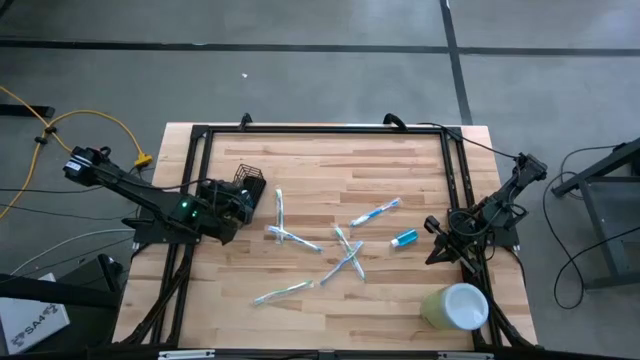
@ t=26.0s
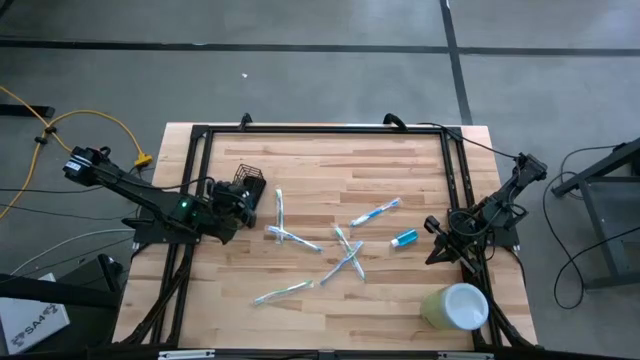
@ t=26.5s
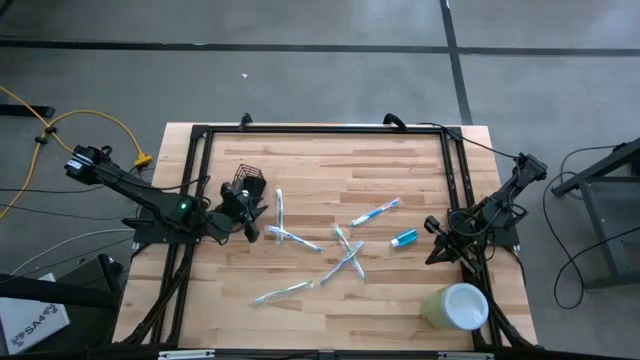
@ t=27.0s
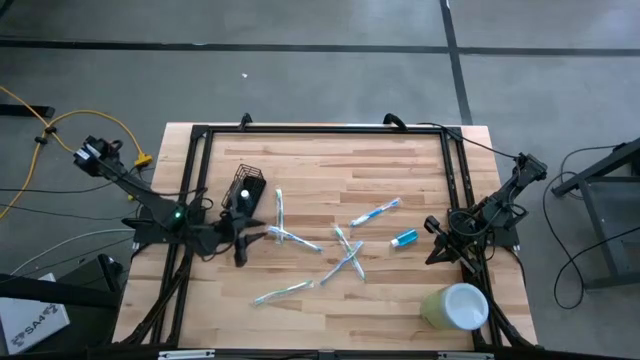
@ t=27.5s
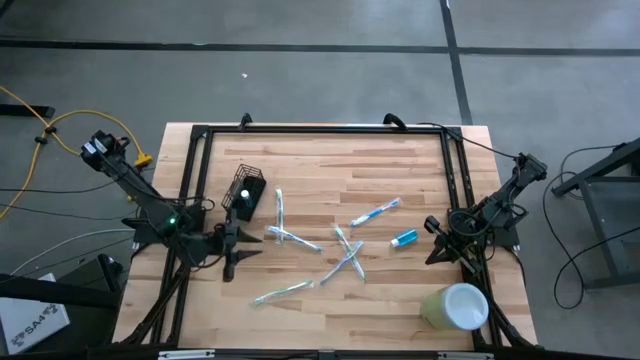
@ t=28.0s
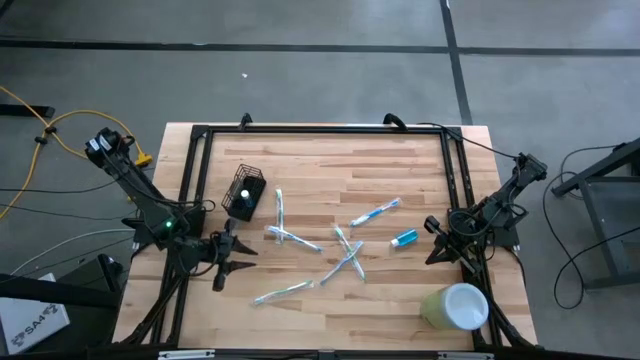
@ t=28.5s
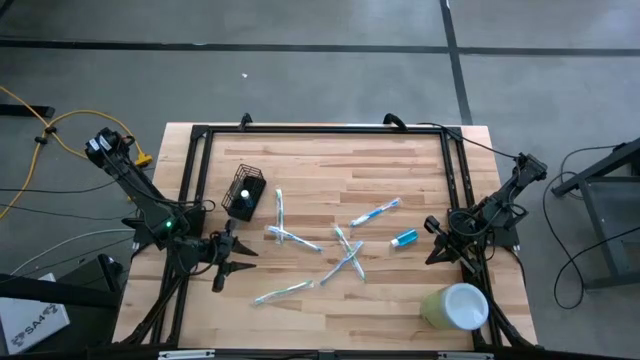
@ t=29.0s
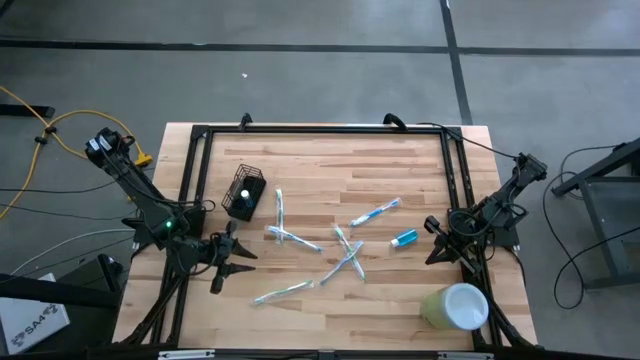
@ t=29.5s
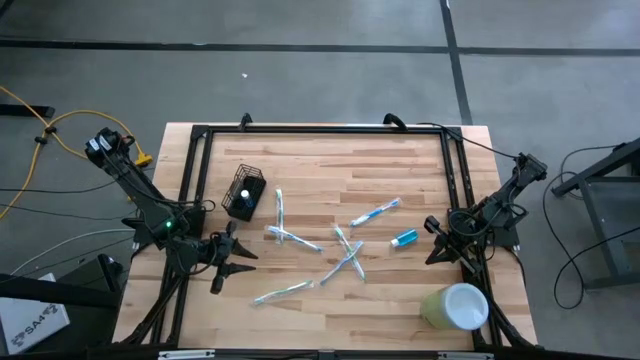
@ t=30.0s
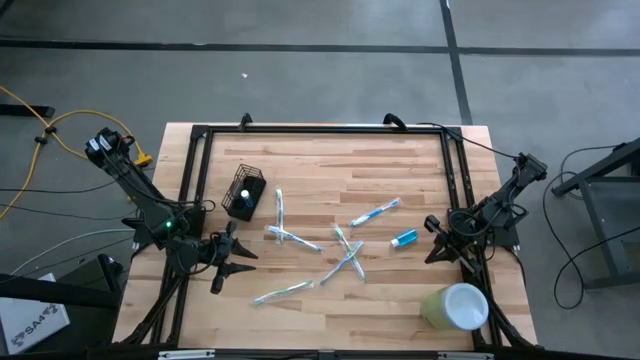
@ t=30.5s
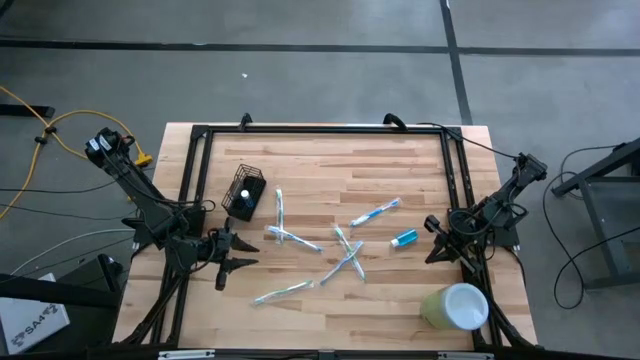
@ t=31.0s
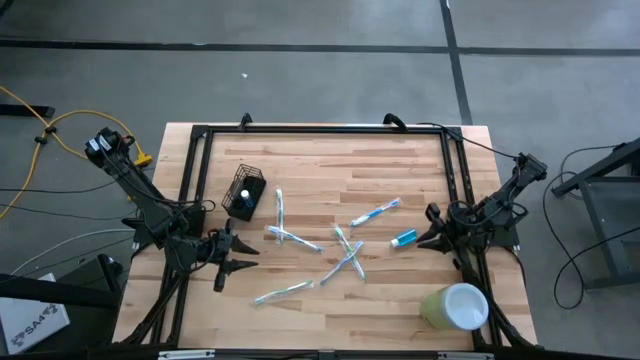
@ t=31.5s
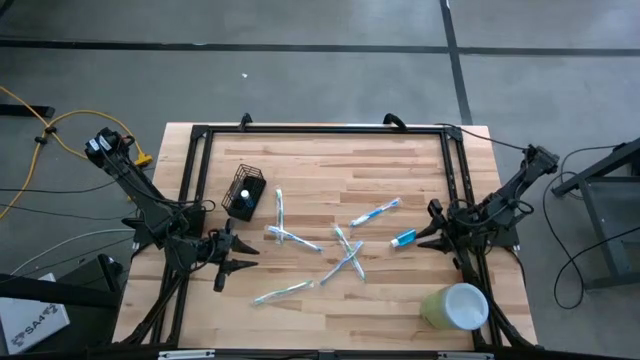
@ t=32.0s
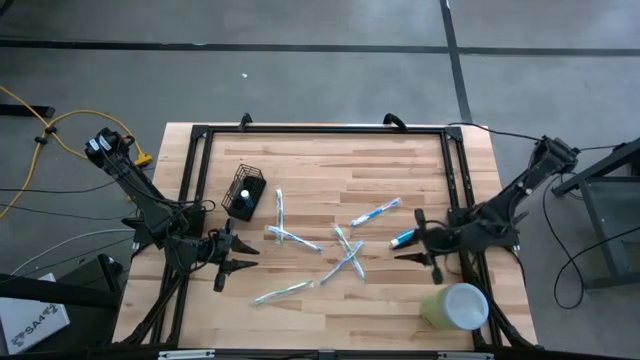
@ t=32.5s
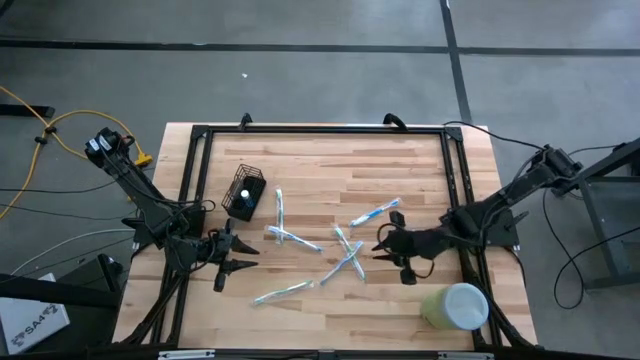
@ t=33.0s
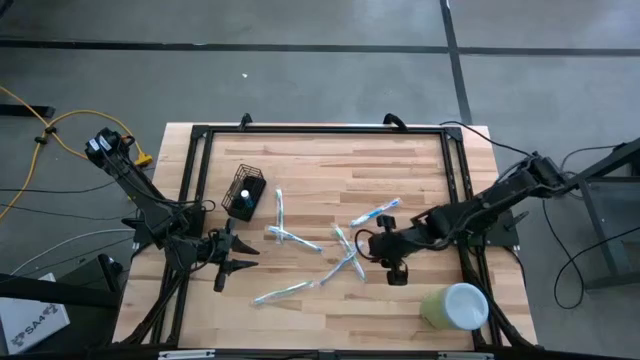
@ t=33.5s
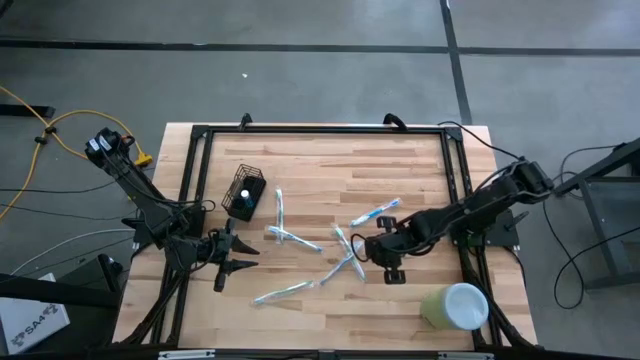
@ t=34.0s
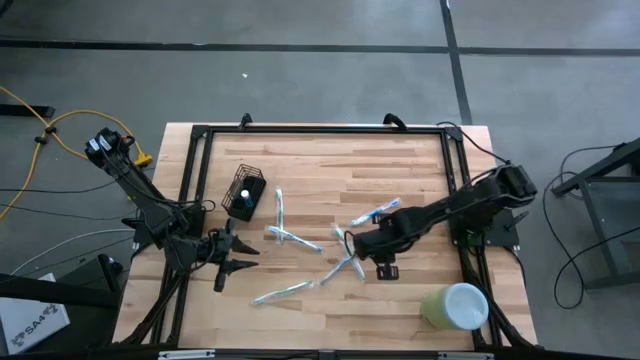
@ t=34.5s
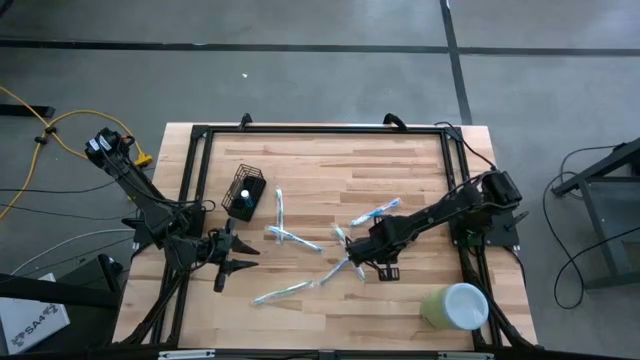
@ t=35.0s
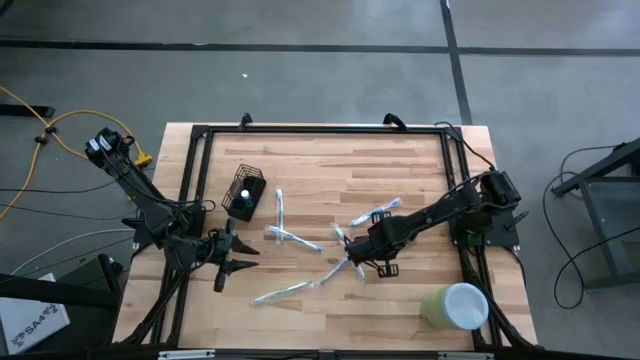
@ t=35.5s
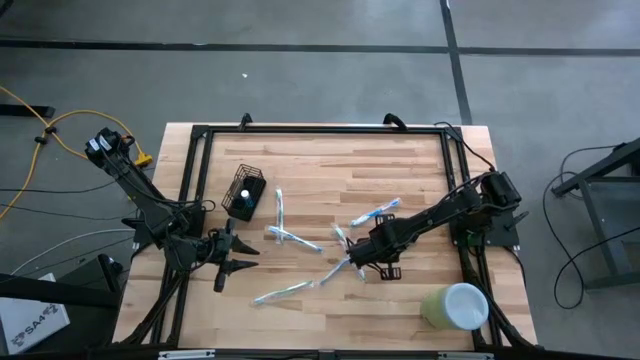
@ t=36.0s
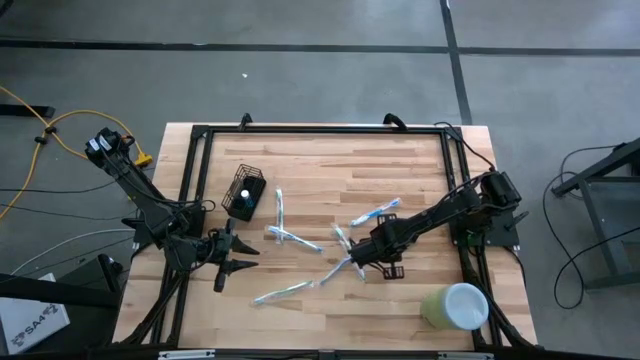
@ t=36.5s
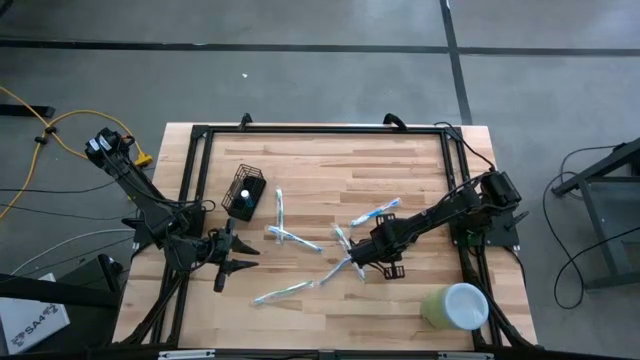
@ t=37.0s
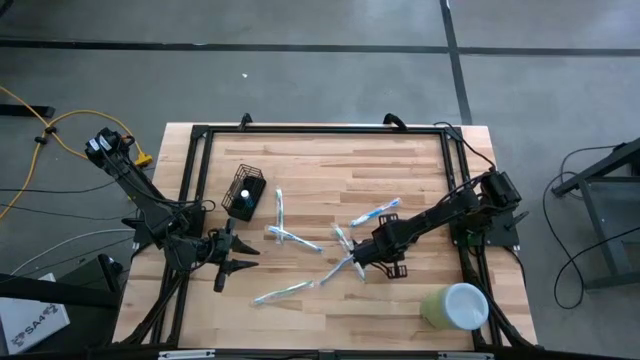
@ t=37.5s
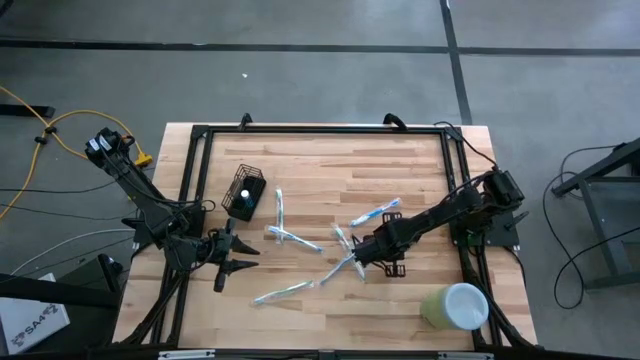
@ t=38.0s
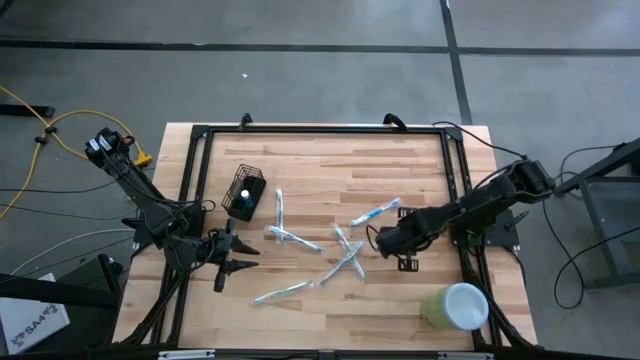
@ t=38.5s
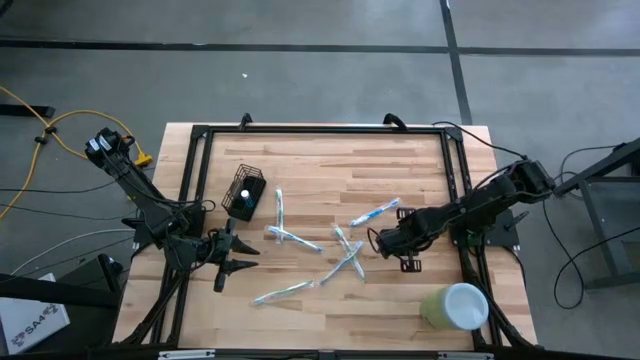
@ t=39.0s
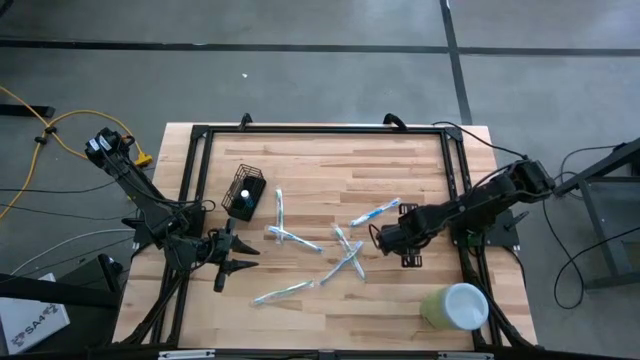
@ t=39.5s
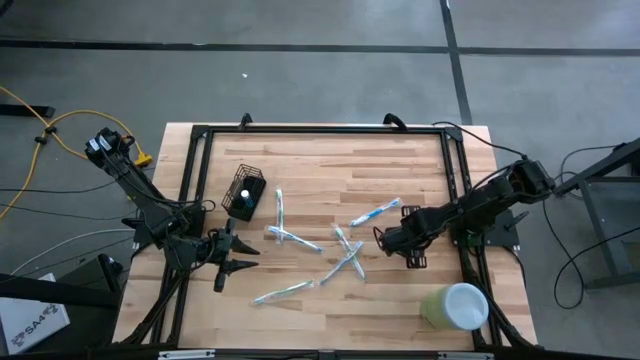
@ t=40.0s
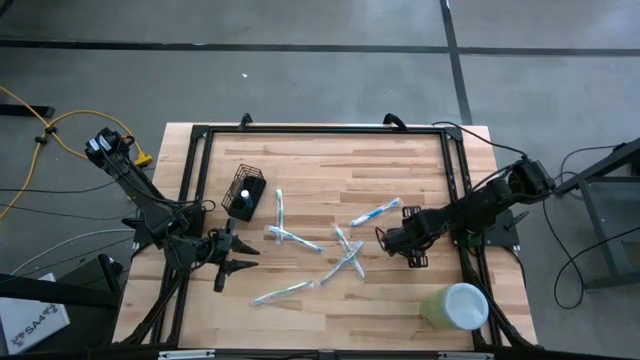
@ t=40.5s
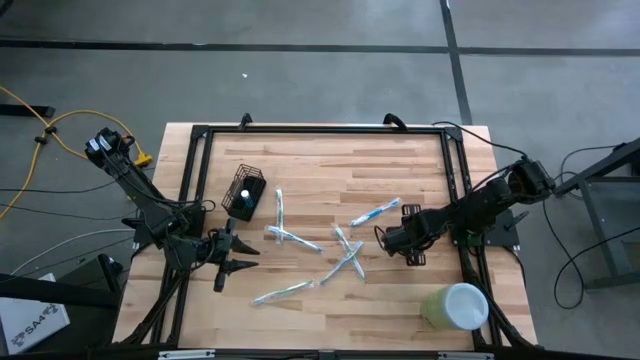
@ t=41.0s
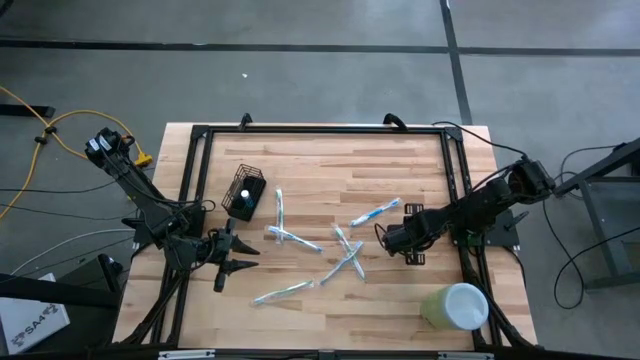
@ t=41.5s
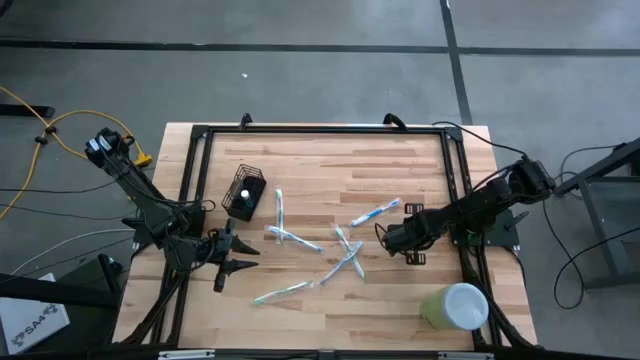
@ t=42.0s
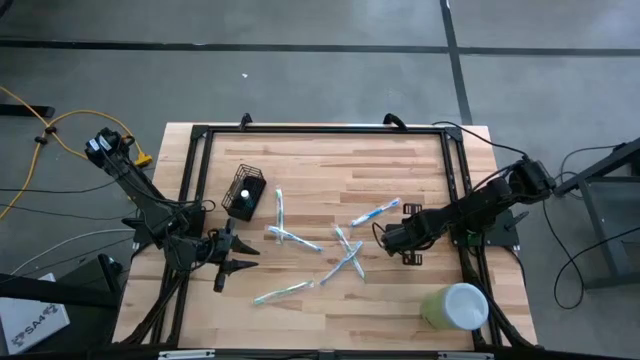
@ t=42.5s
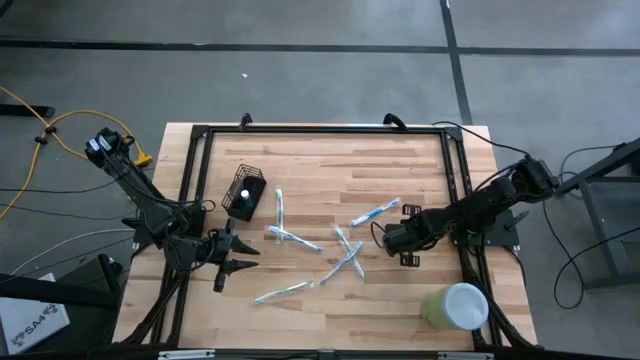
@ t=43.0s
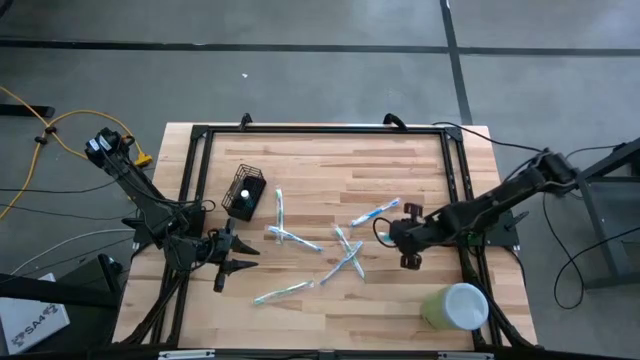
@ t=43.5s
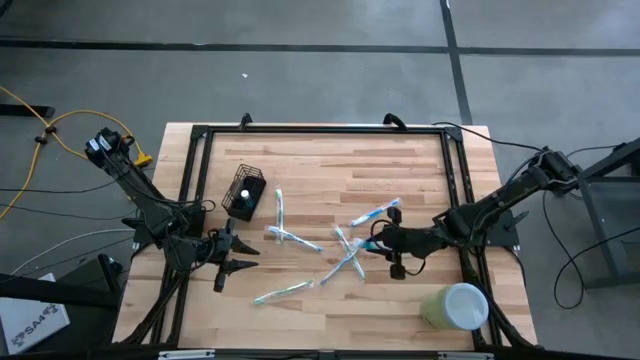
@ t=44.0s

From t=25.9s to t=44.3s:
Task: Pick & Place toothbrushing station
Put the blue mouthwash into the black wire organizer

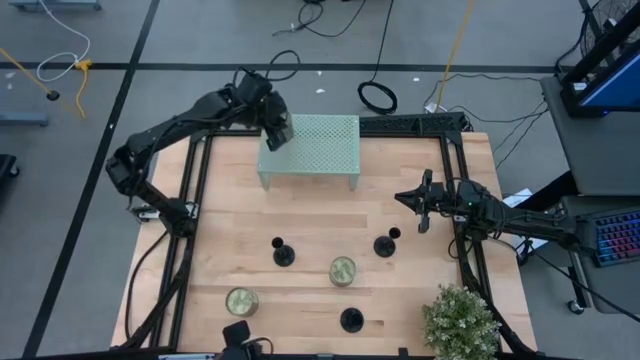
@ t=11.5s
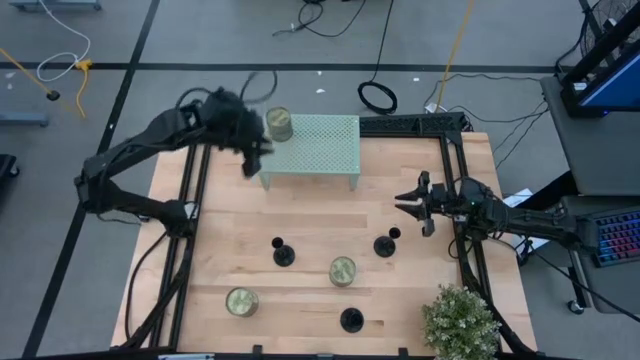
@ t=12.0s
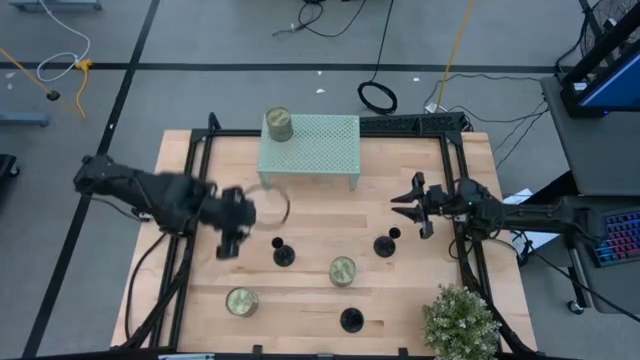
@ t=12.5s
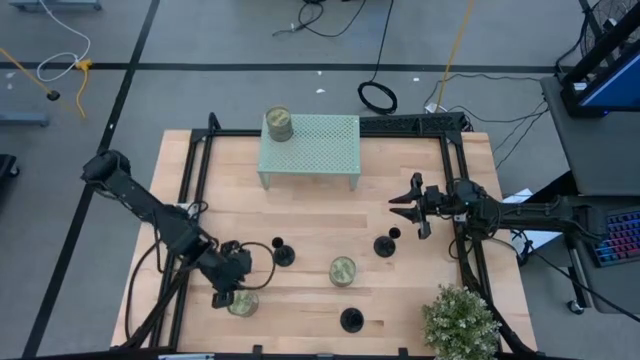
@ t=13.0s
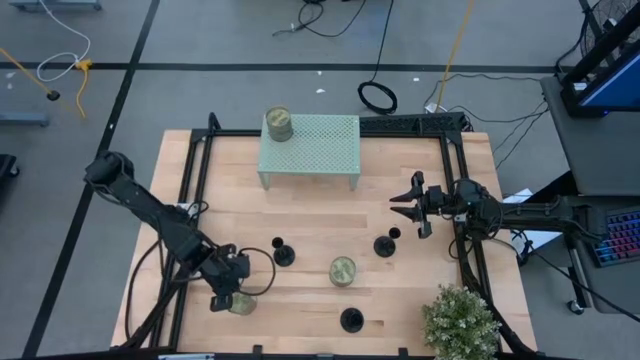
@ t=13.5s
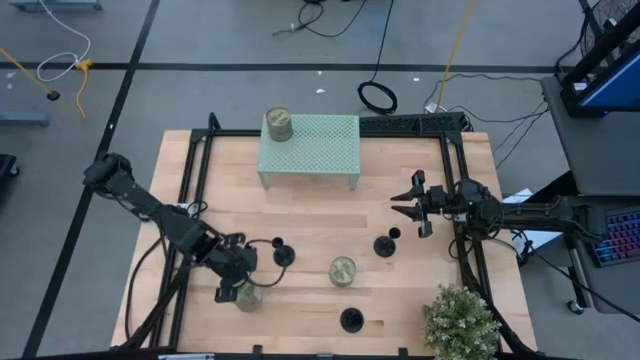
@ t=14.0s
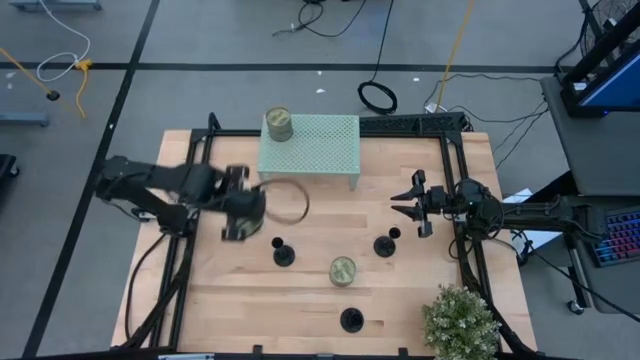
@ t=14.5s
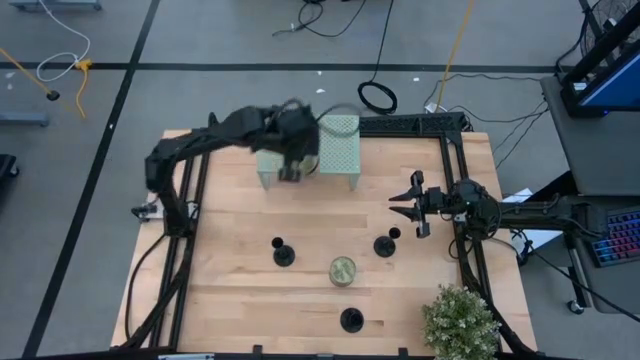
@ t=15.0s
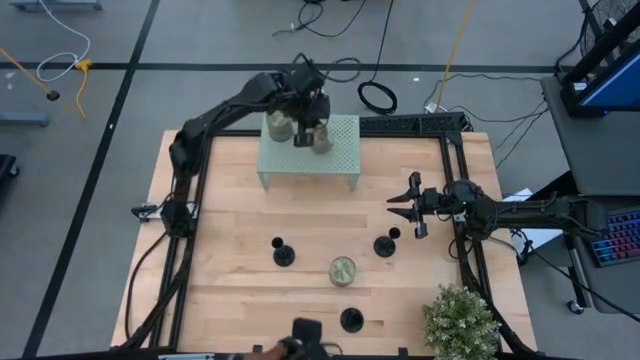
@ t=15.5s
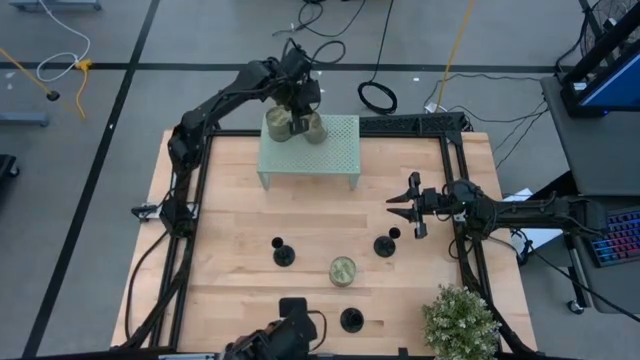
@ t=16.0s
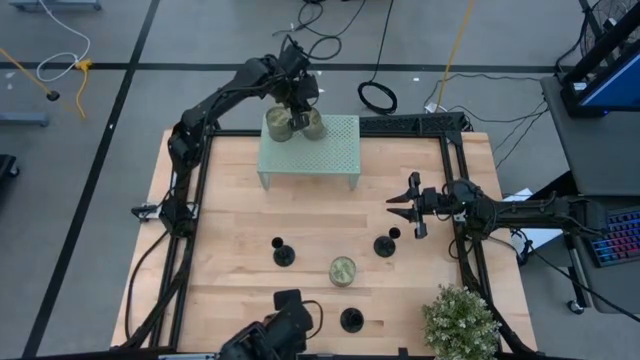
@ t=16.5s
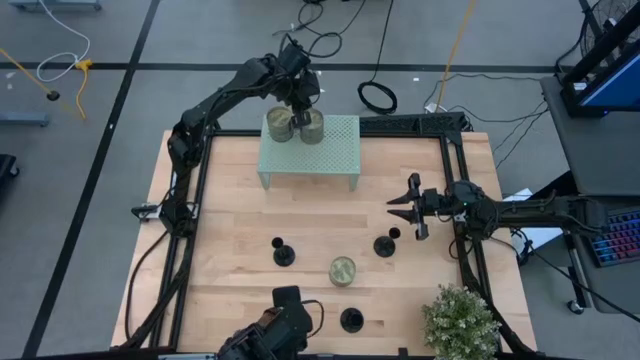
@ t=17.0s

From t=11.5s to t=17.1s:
Task: Pick & Place candle stick holders
Put the bottom scented candle on the shelf
